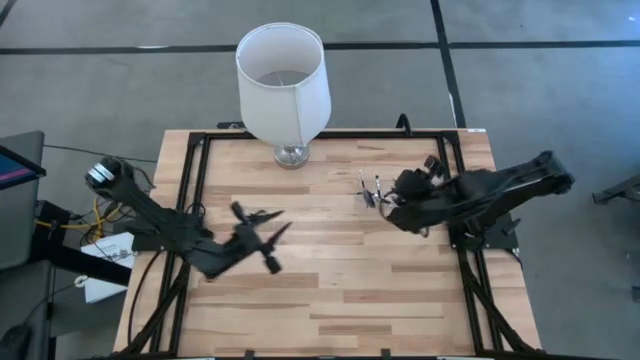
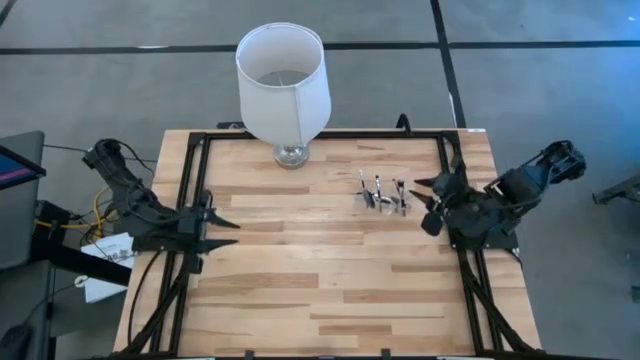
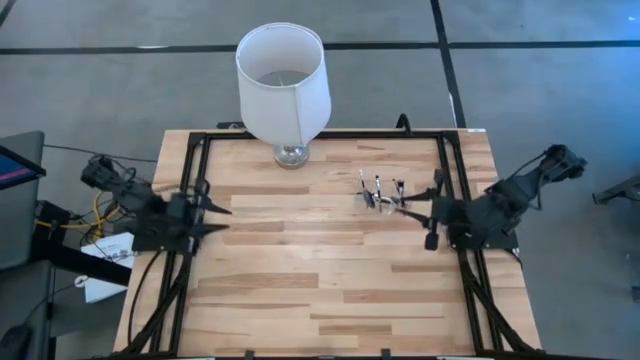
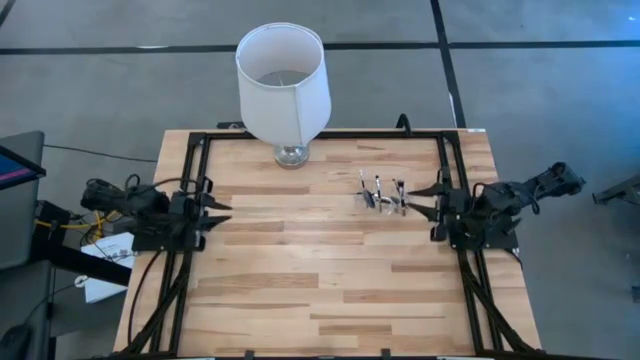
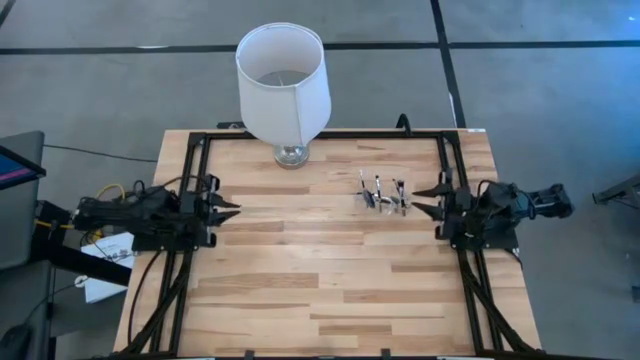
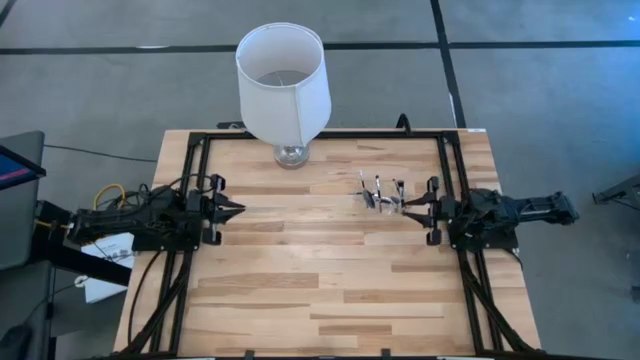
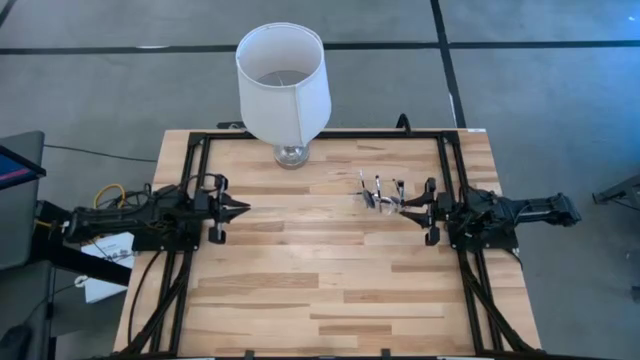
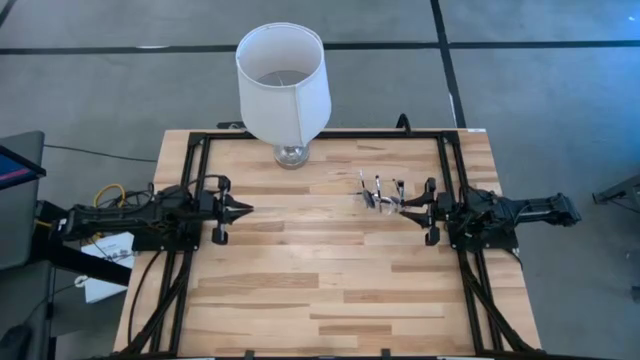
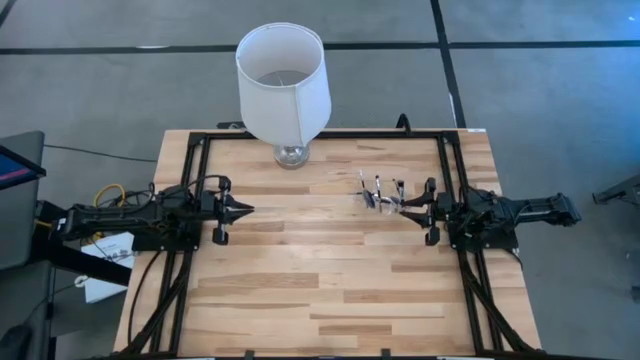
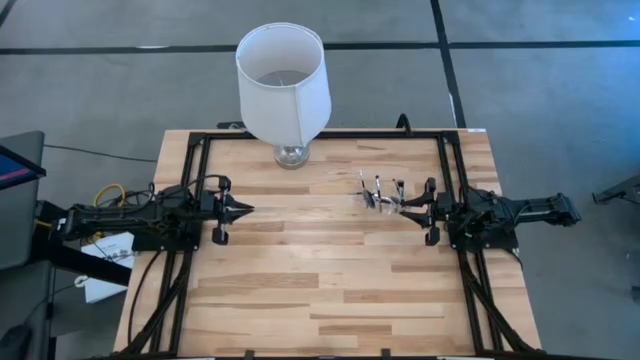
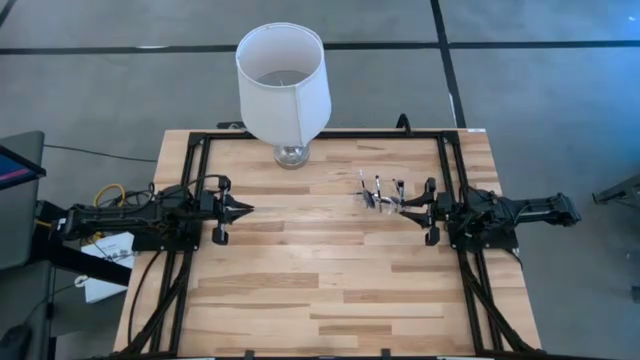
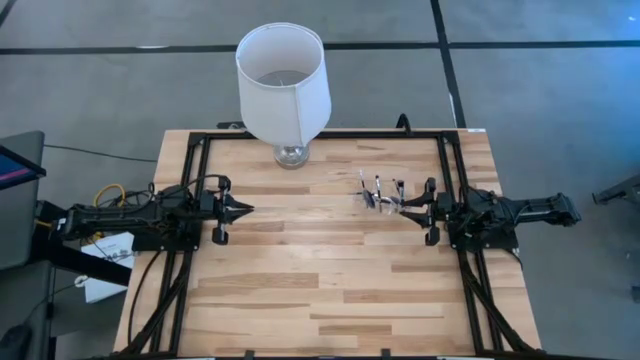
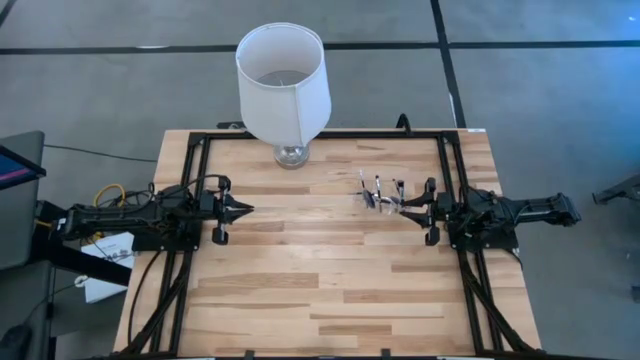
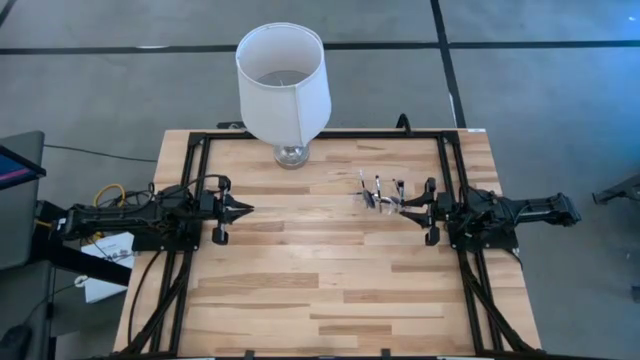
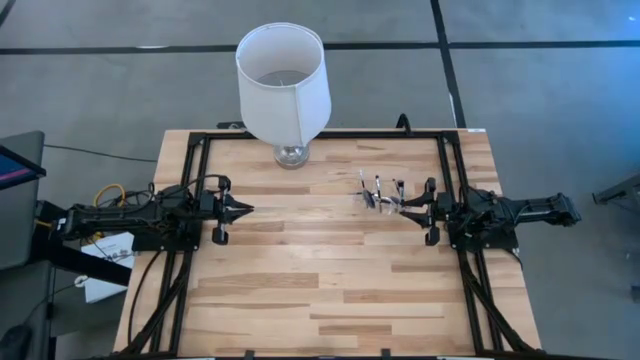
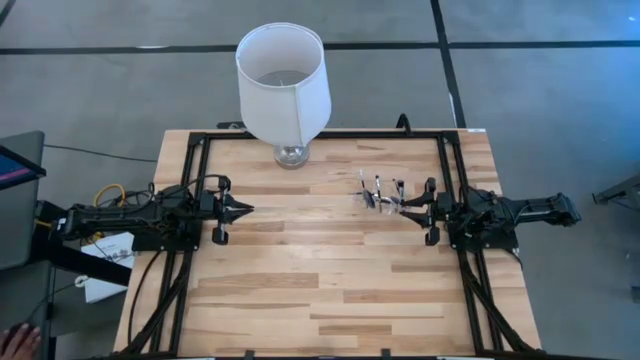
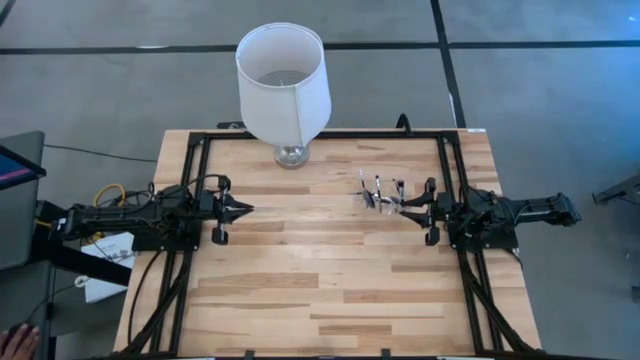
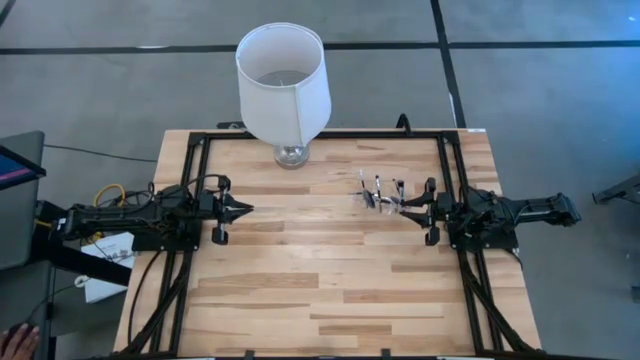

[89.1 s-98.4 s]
Task: Pick & Place Makeup Supplies
Return to Home Position

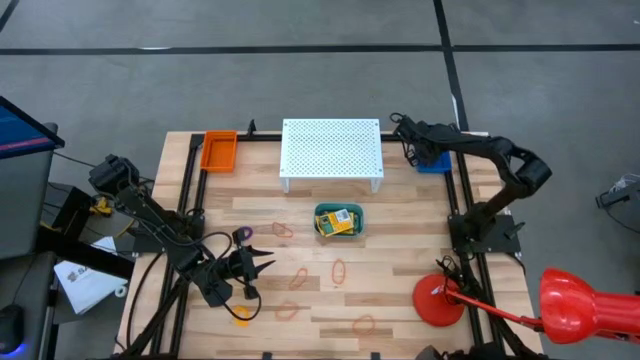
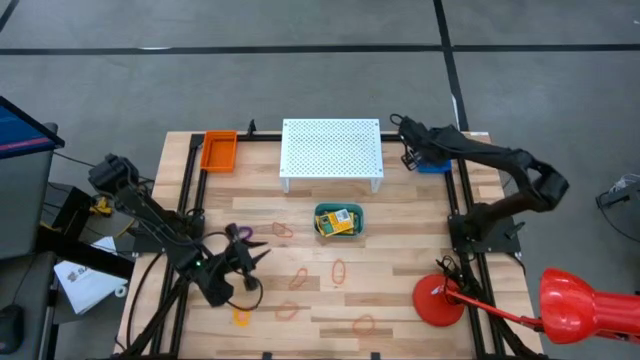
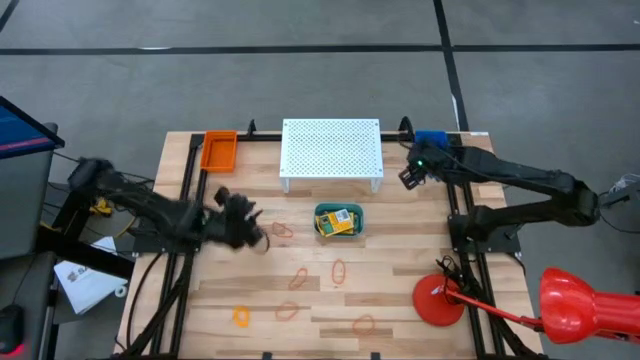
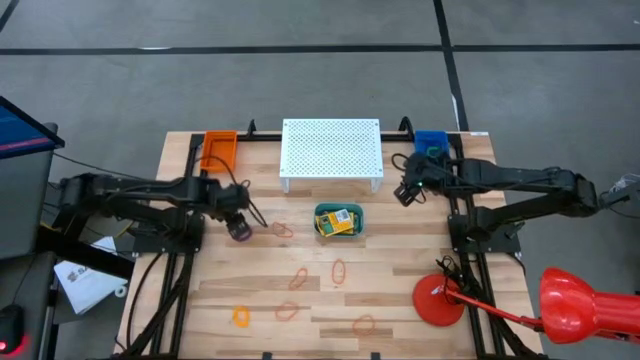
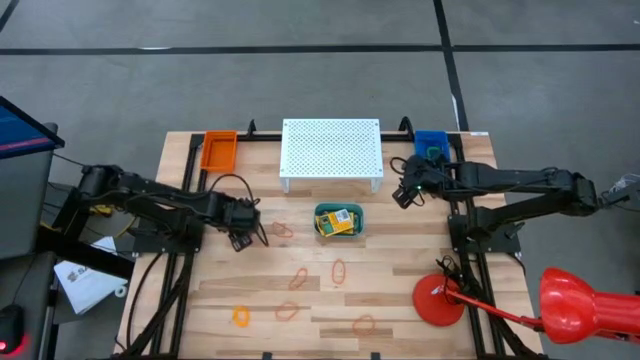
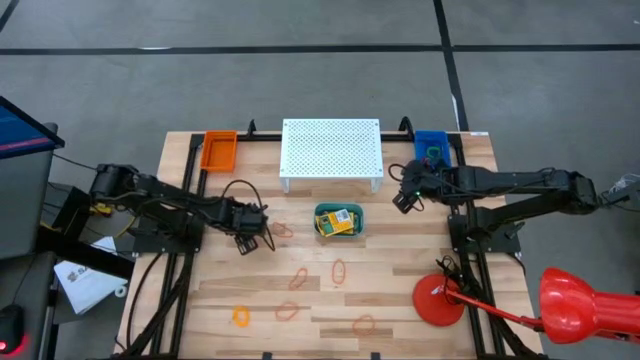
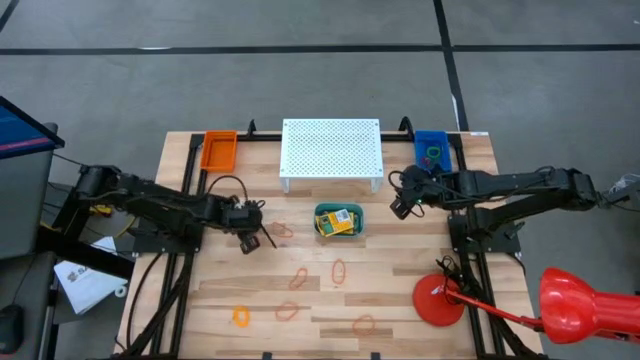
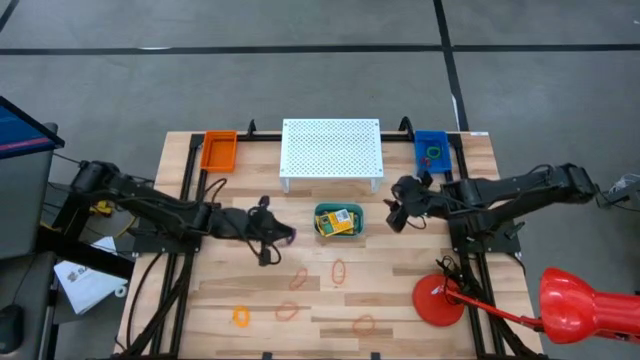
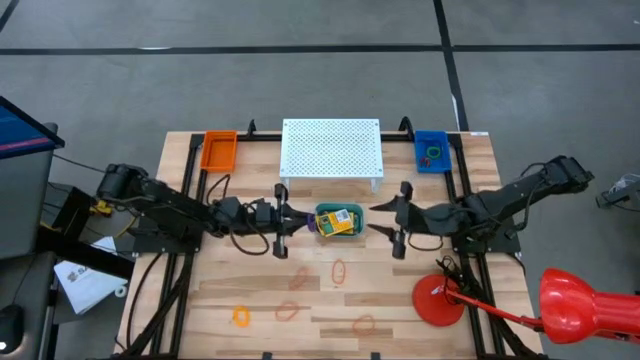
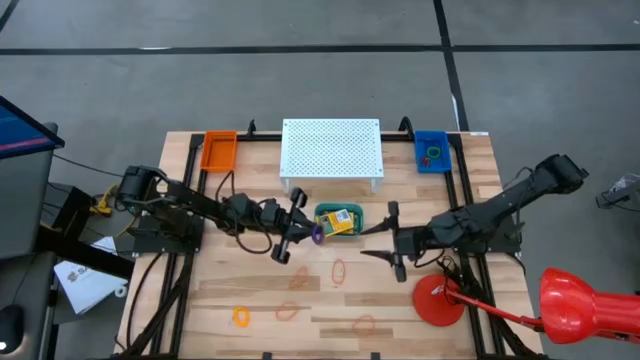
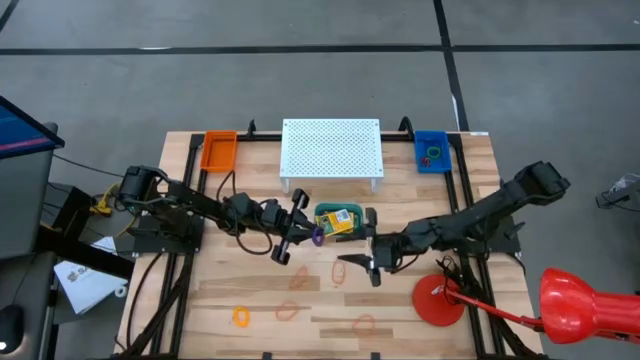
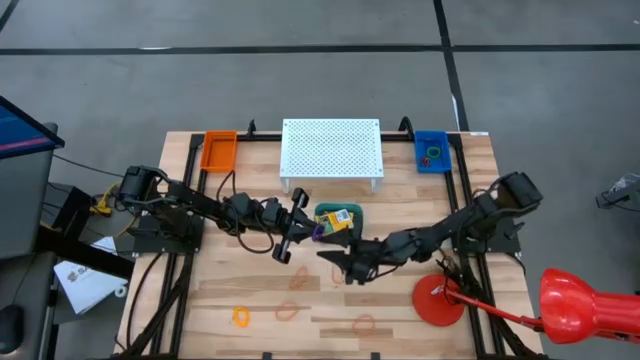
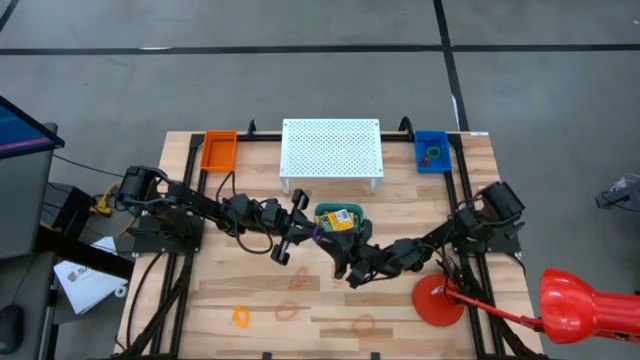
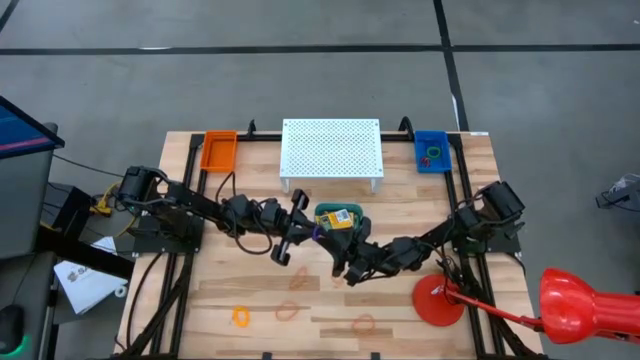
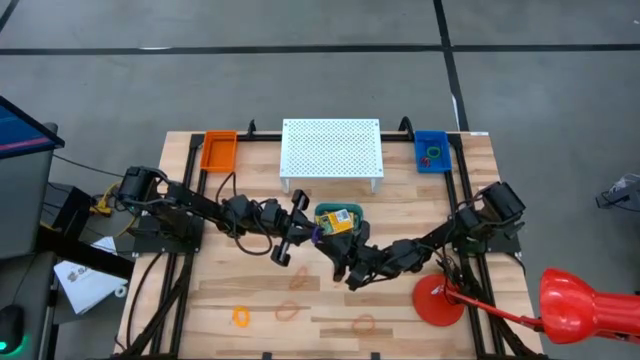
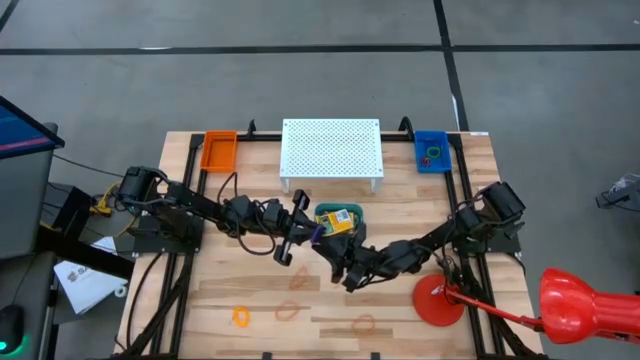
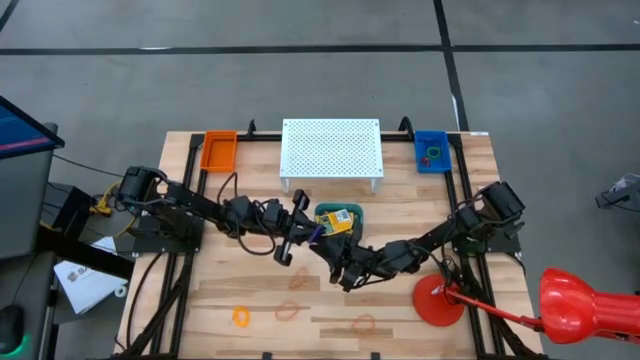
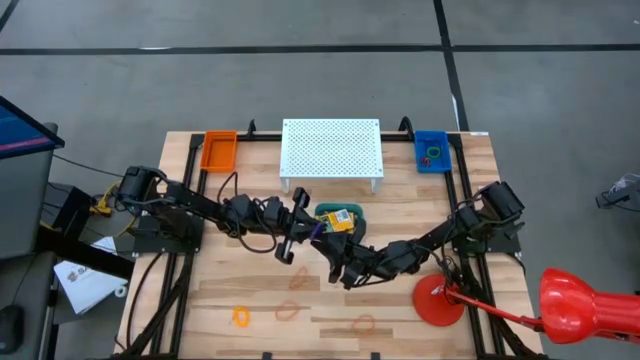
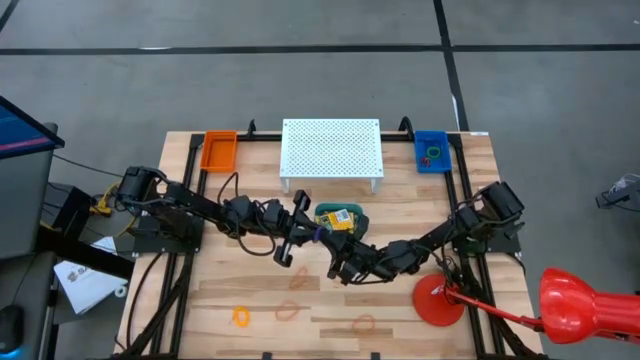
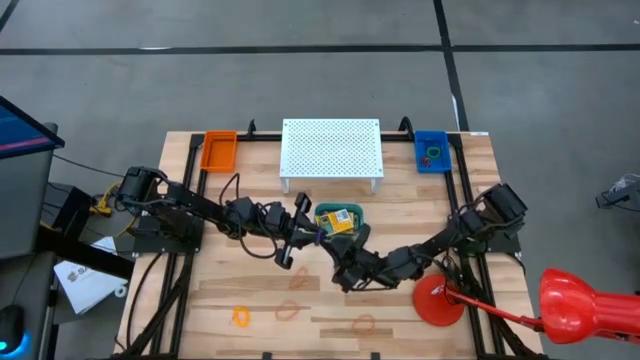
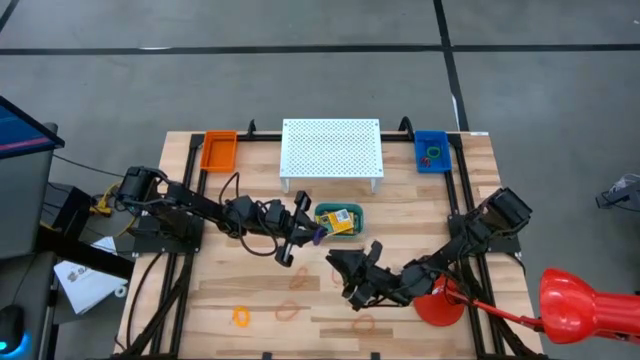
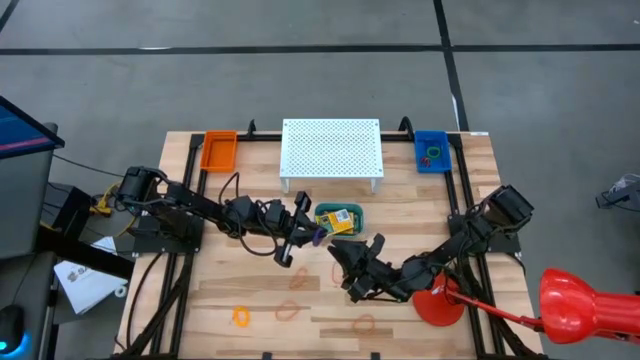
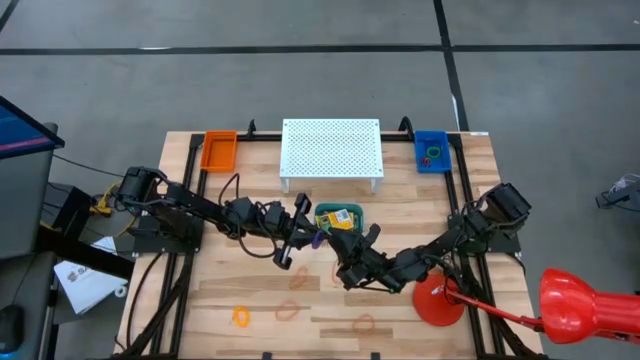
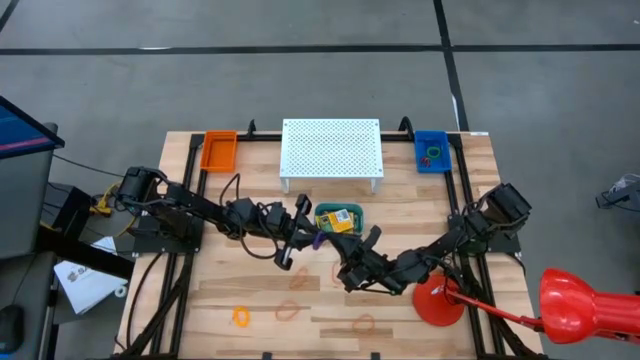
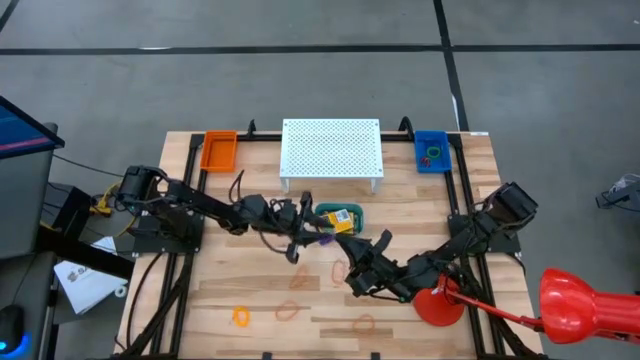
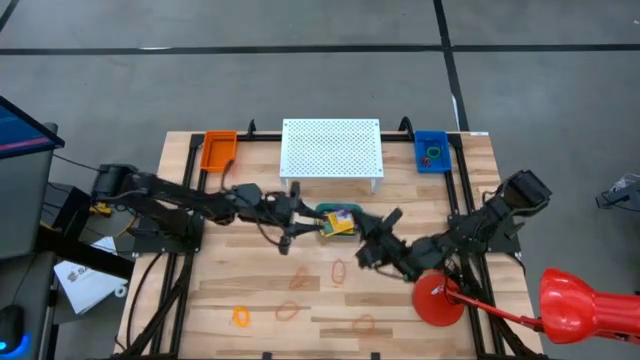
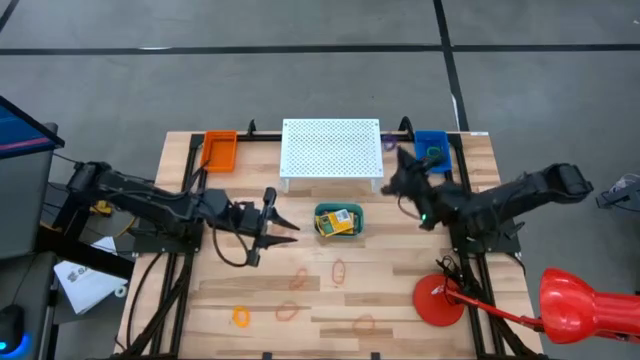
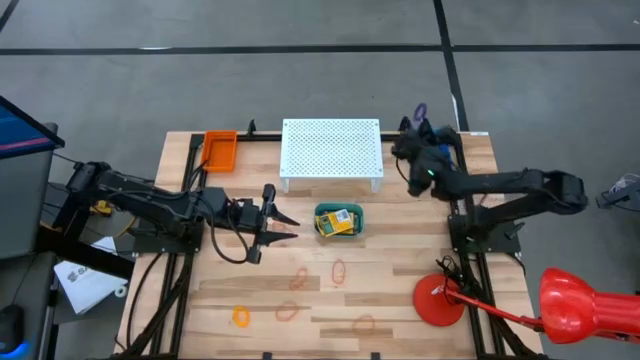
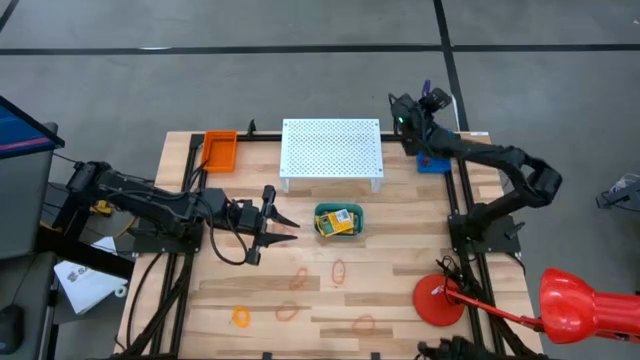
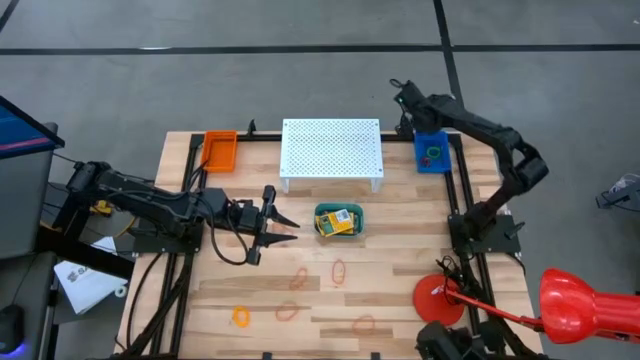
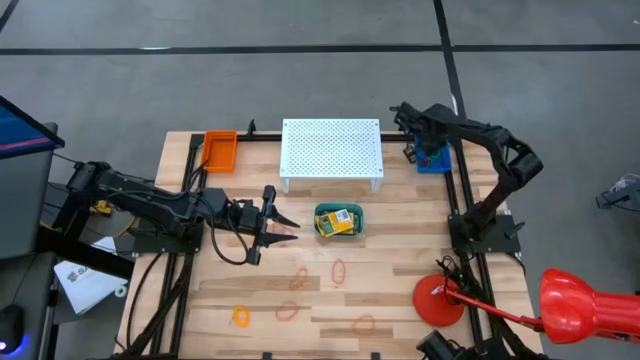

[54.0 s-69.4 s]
Task: Pick & Place Office Desk Supplies
Put the purple keychain into the blue bin
